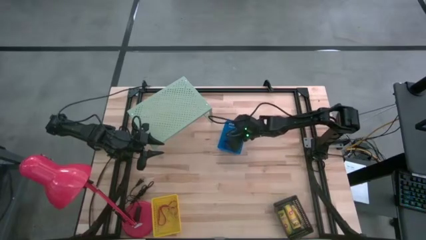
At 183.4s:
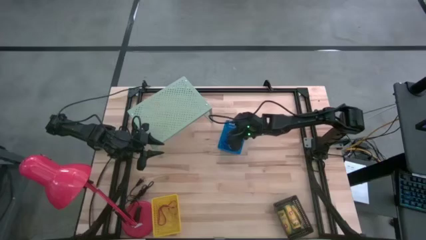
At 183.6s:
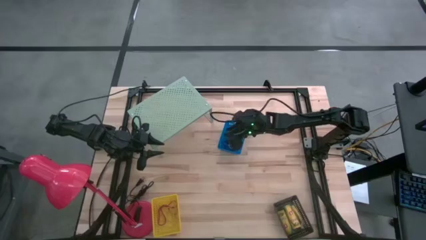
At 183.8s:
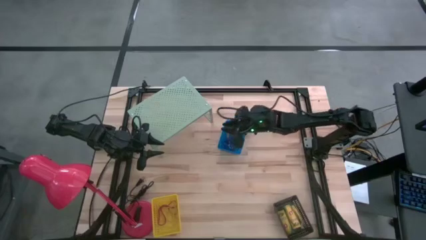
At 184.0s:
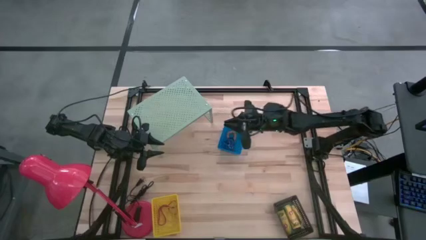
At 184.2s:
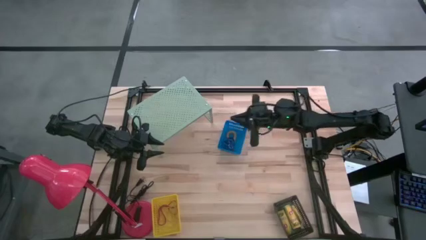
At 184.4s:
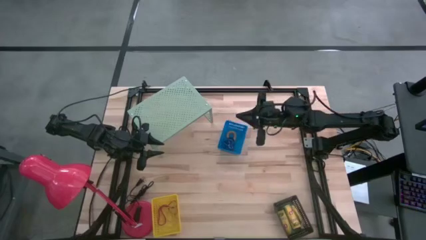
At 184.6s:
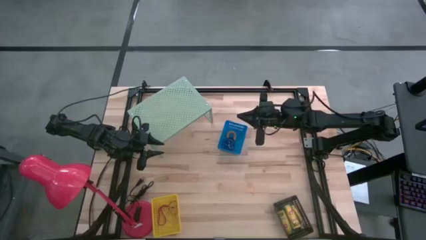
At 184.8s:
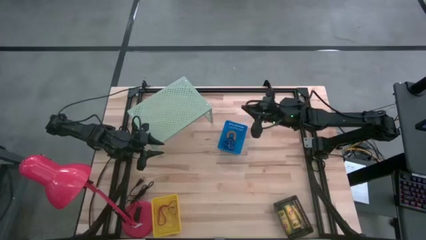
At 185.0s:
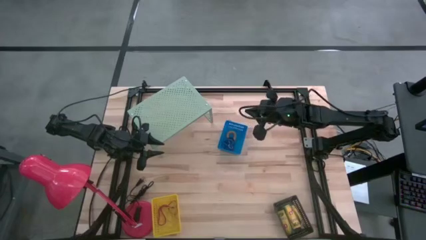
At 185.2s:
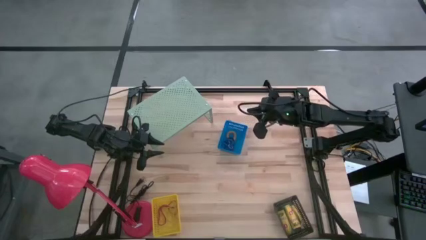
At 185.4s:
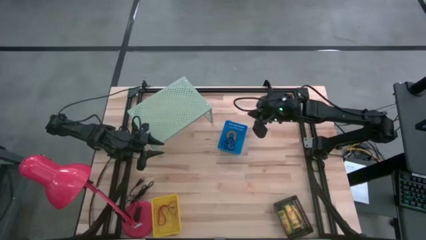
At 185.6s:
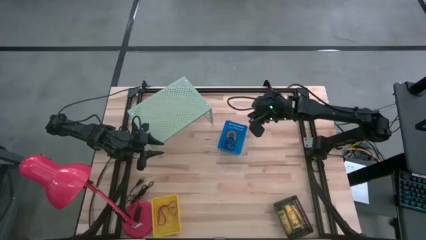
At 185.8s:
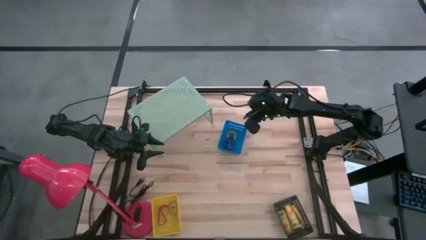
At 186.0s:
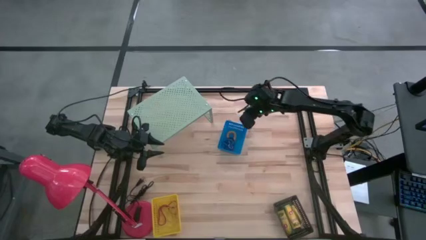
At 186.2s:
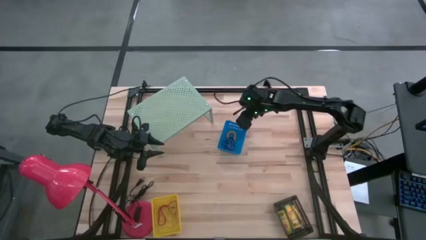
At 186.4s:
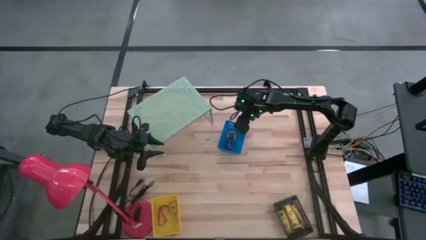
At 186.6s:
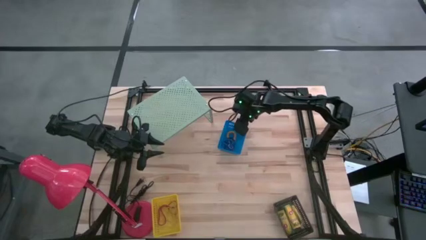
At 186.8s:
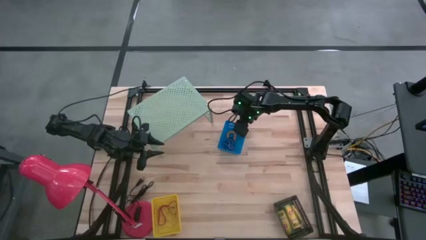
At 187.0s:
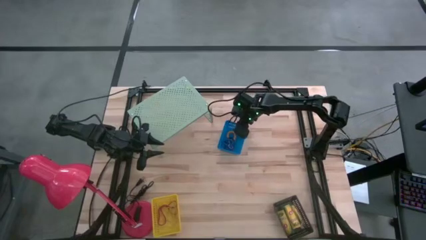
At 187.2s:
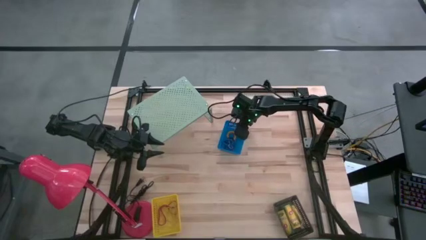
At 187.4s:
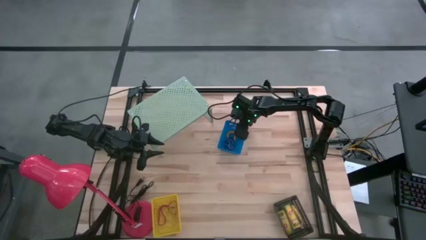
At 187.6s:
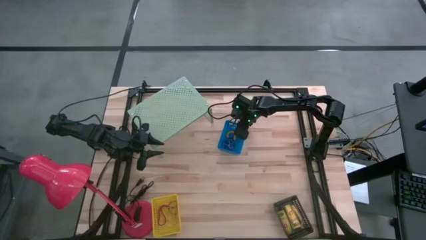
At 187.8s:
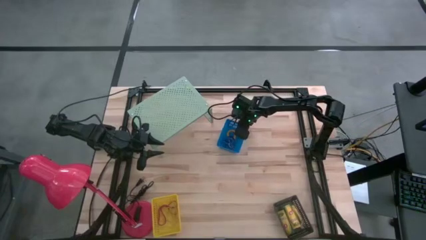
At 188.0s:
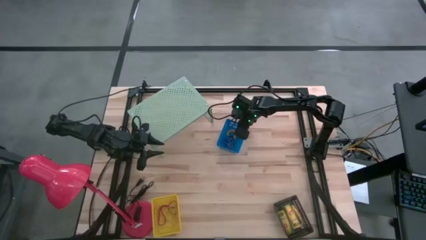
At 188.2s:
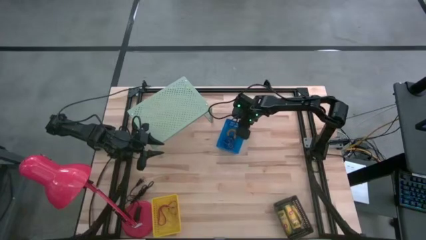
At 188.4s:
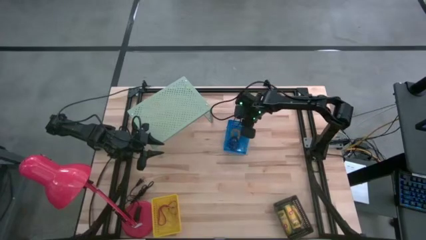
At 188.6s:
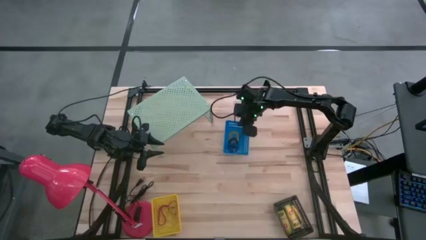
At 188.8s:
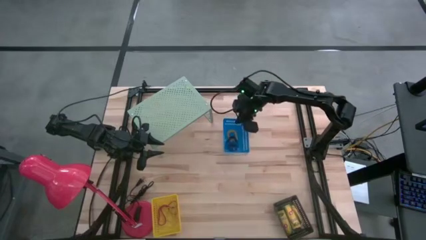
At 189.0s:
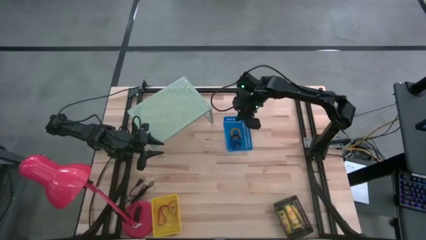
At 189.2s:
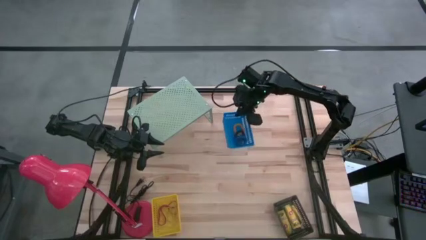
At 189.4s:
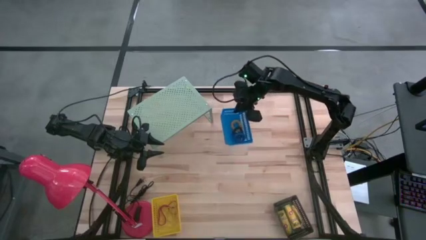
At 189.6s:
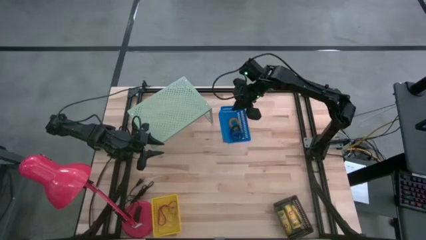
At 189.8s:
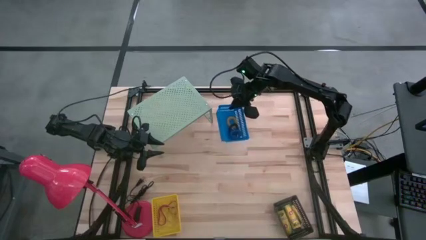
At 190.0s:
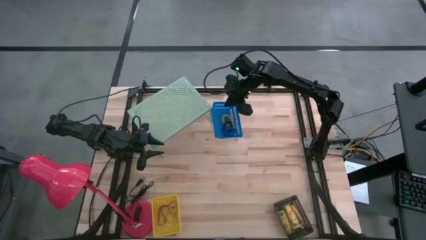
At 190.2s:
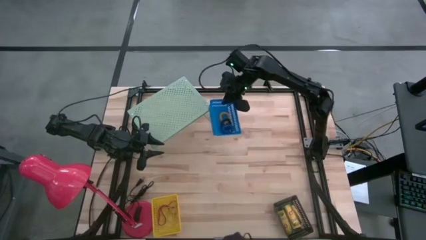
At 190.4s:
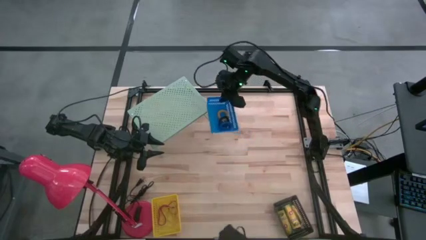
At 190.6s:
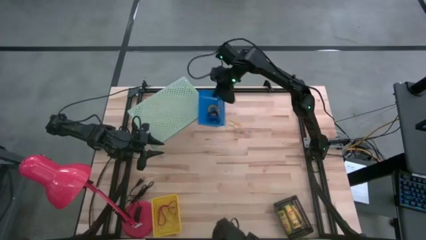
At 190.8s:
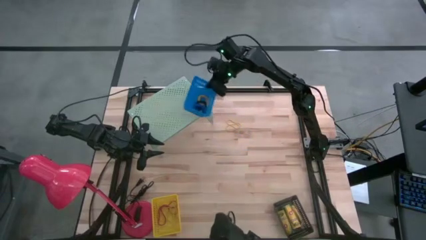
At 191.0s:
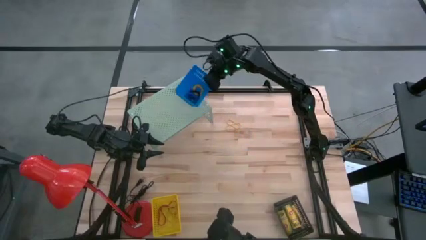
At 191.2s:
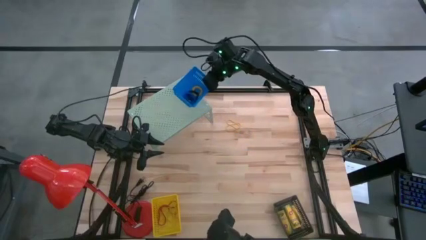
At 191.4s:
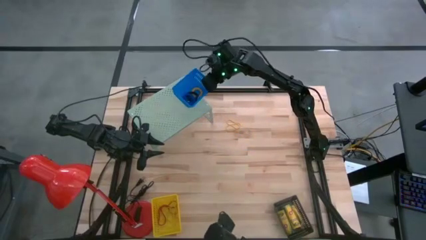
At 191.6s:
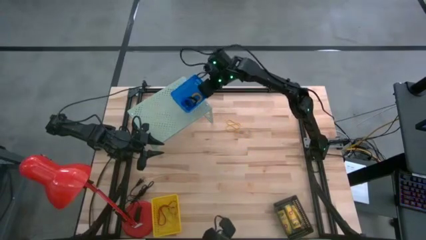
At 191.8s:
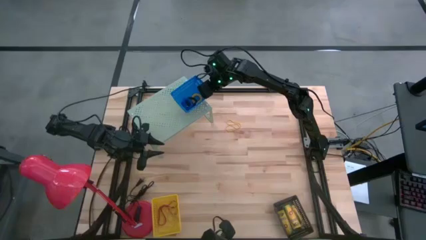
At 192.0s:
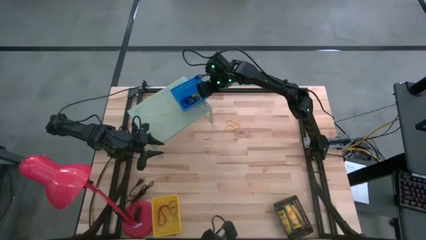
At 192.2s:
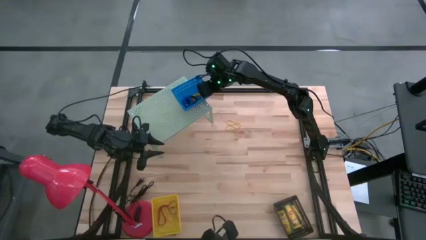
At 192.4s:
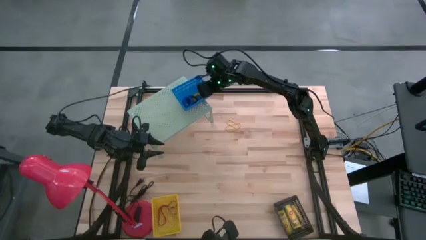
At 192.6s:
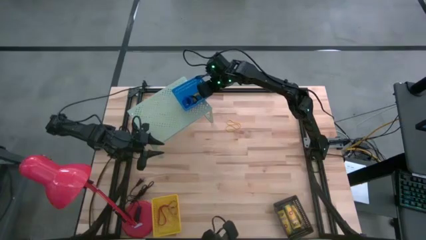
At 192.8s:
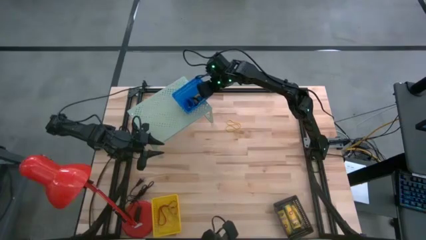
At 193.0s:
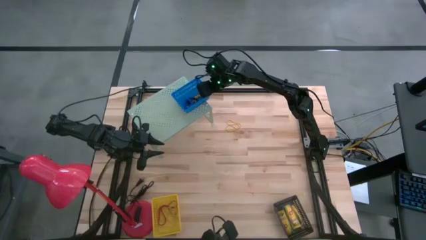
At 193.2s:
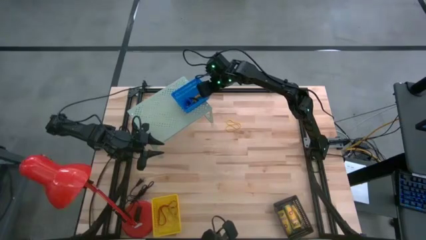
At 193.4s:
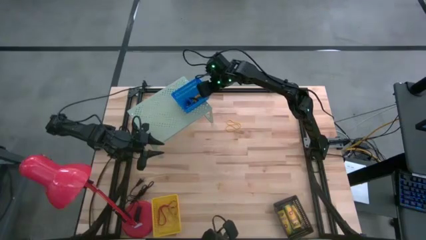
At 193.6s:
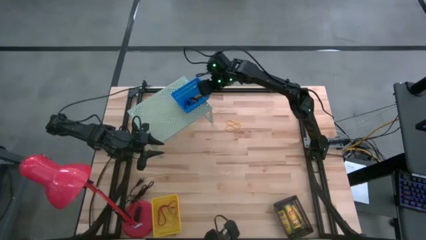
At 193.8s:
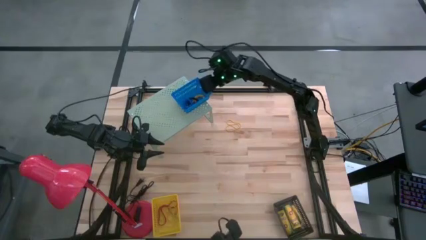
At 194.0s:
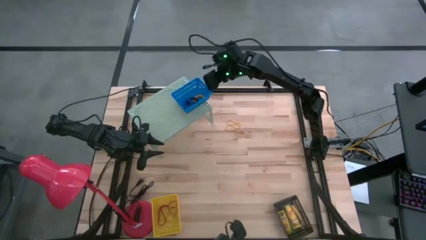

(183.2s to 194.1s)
Task: Pick & Place Office Desk Supplies
Put the blue basket on the shelf

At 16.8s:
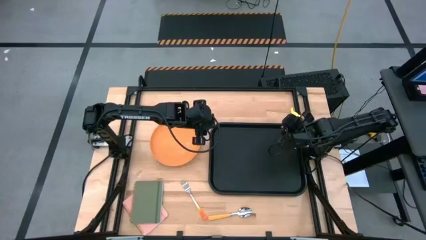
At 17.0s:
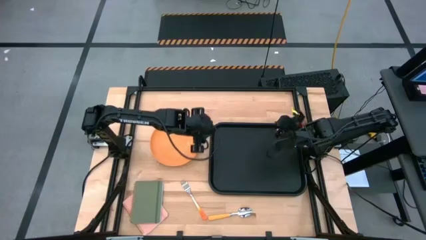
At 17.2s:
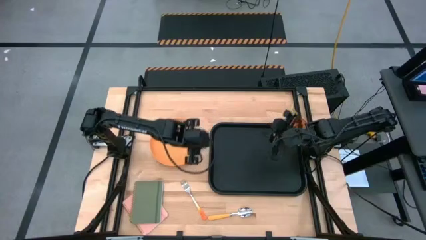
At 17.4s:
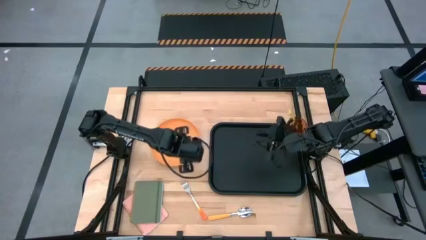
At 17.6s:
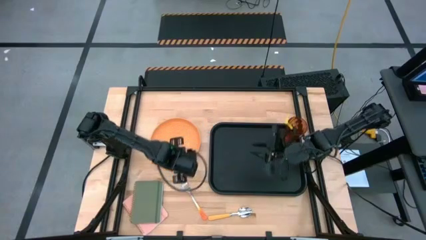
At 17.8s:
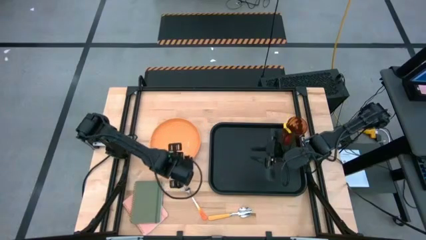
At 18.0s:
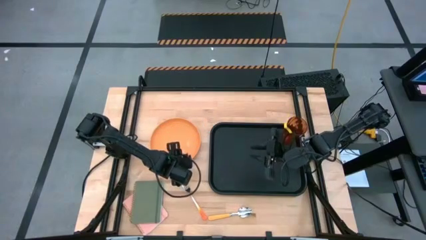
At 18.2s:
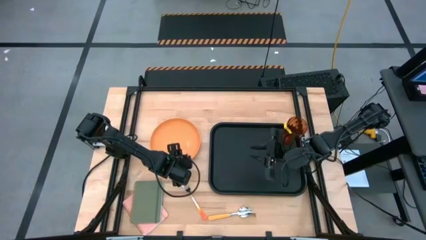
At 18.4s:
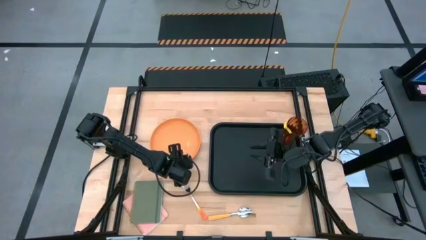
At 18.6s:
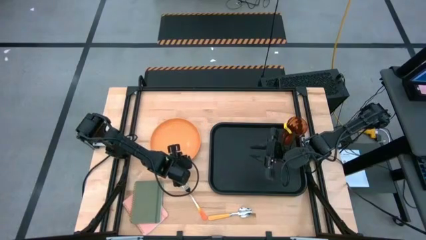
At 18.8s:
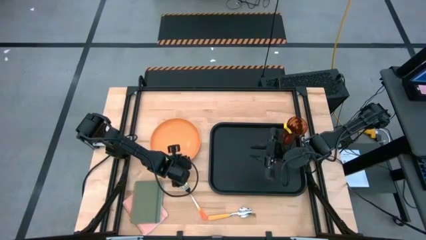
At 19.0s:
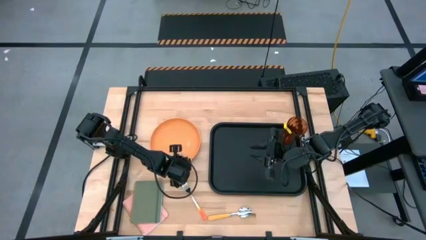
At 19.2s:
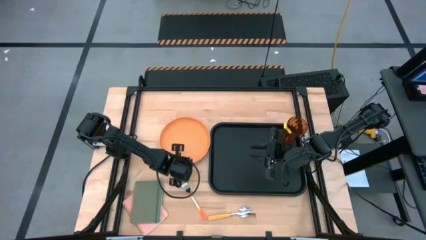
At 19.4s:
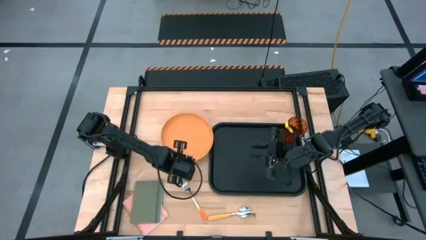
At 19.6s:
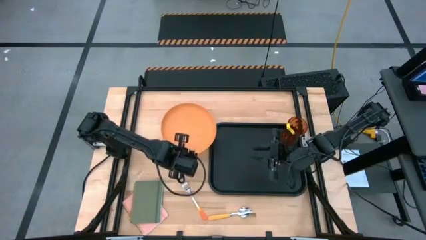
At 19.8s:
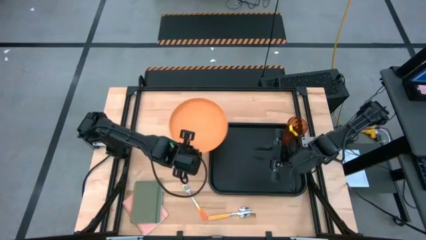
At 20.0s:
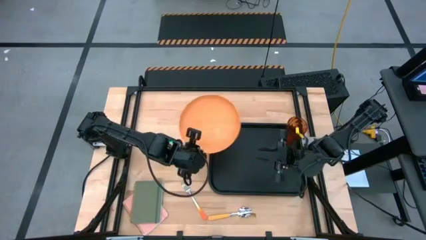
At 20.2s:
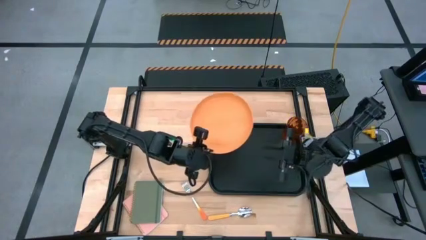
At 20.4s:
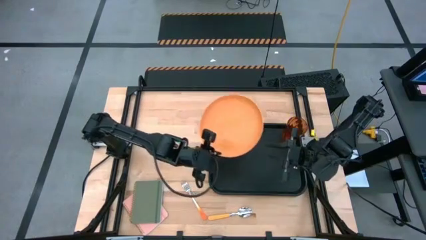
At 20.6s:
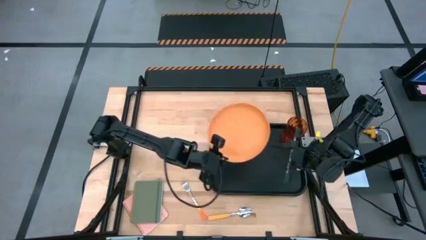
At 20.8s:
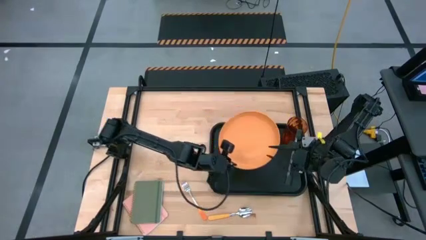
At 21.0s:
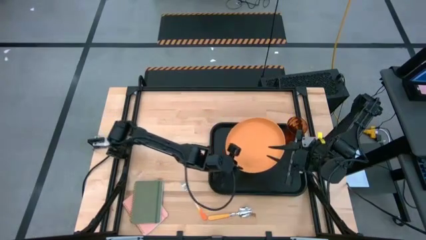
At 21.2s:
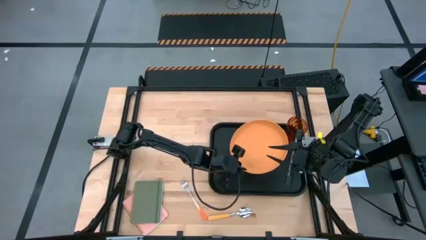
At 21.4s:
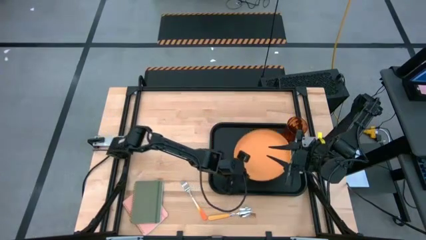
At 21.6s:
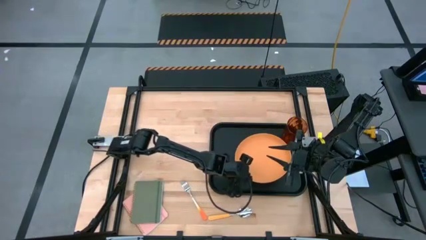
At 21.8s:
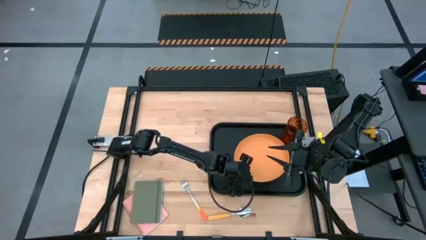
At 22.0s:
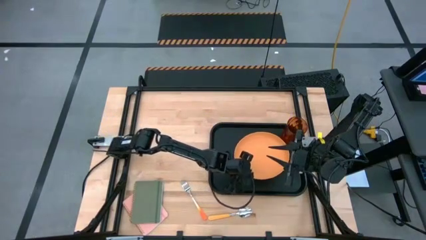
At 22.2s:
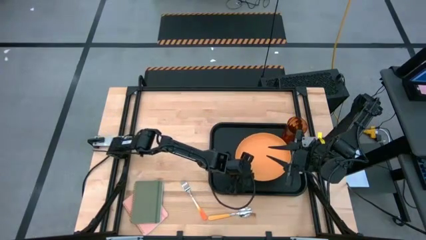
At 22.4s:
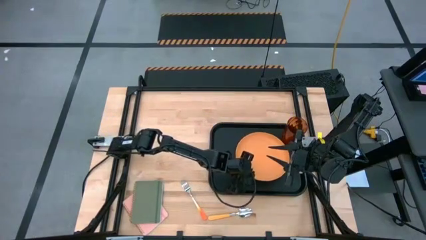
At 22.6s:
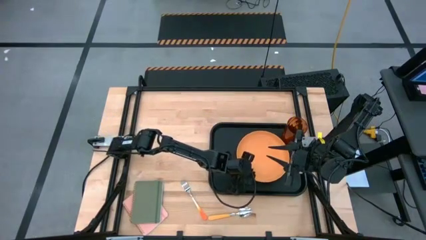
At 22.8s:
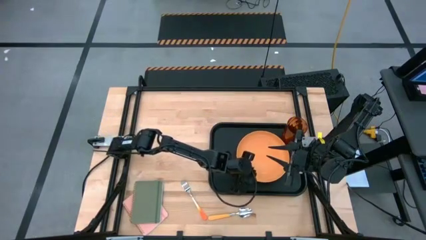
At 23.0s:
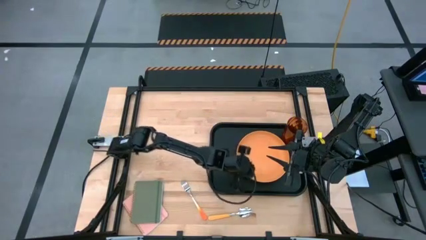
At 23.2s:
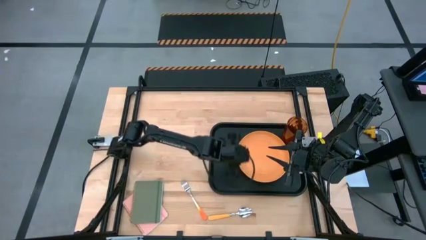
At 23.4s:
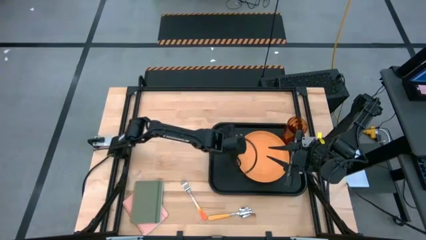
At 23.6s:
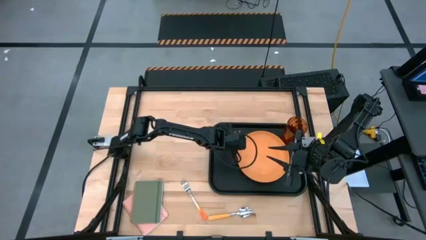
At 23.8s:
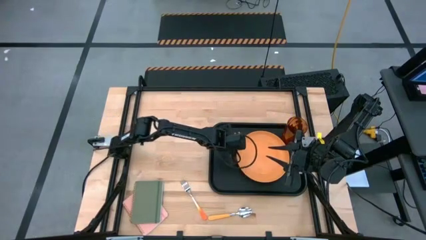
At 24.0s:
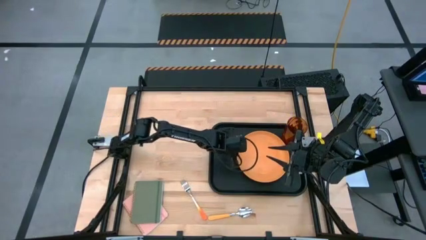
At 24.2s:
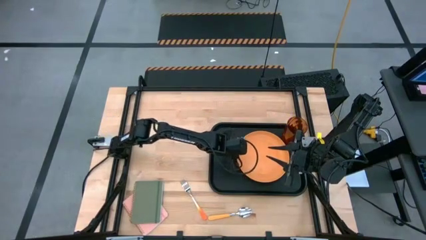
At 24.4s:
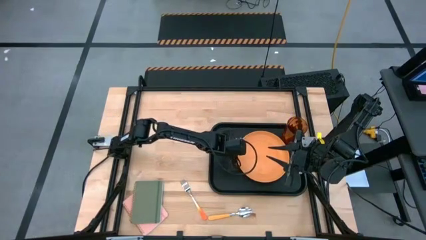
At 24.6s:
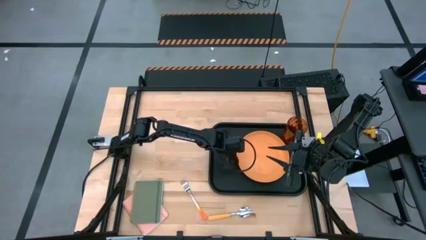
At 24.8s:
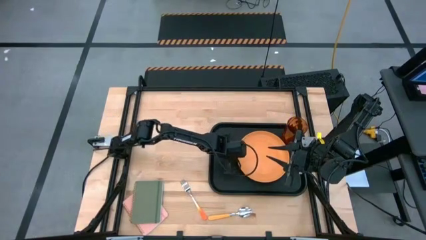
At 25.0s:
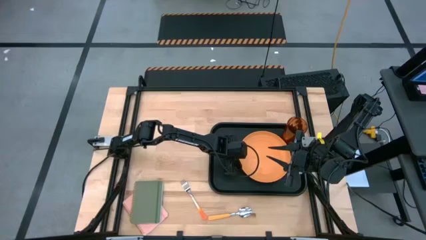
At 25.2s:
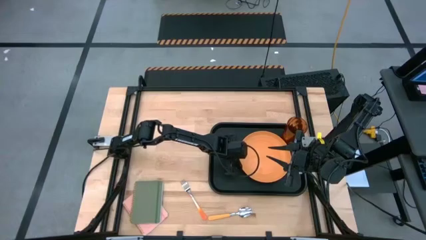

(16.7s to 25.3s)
Task: Pick and place plate/cup/fork/spoon on tray
Put the orange plate on the black serving tray
